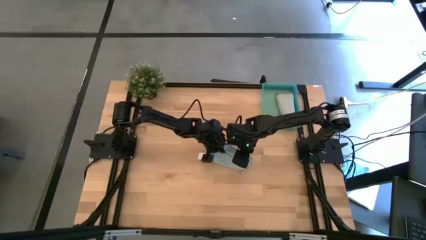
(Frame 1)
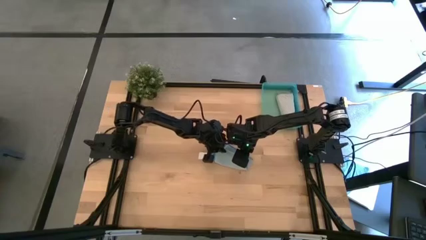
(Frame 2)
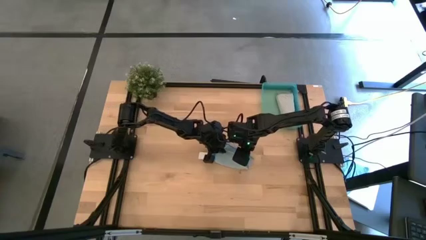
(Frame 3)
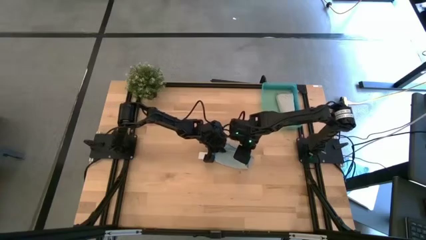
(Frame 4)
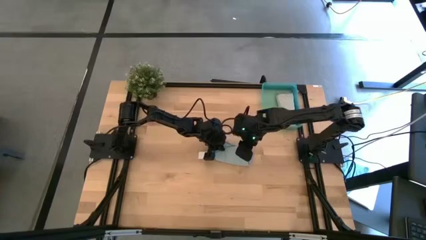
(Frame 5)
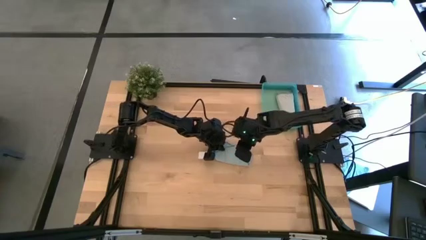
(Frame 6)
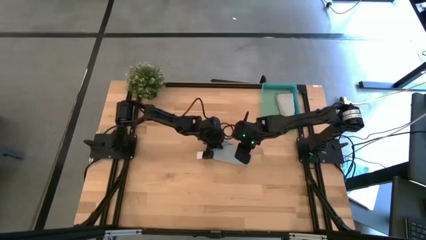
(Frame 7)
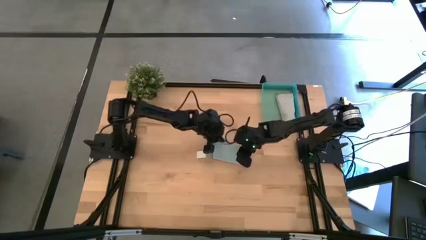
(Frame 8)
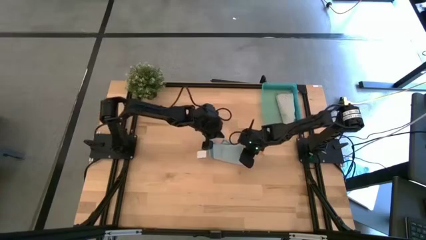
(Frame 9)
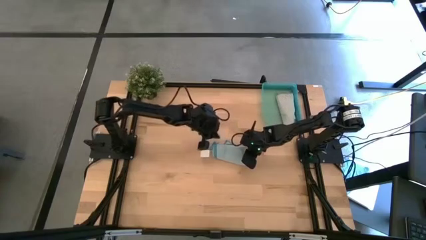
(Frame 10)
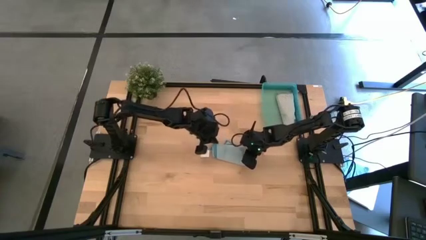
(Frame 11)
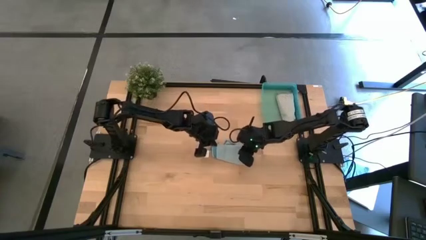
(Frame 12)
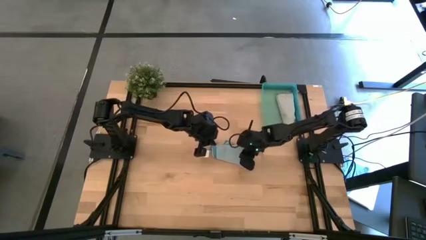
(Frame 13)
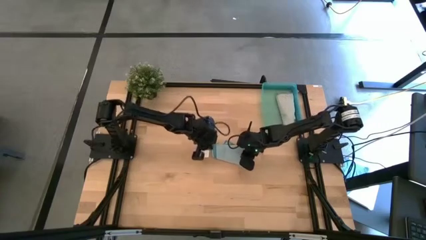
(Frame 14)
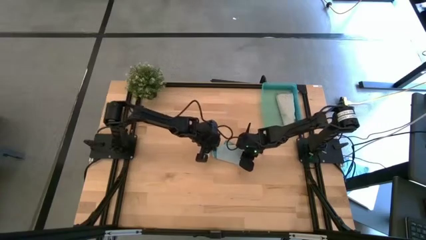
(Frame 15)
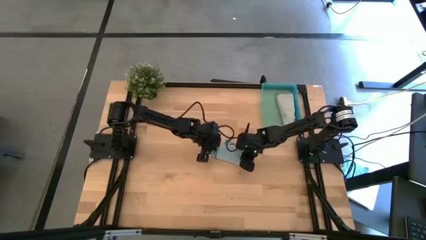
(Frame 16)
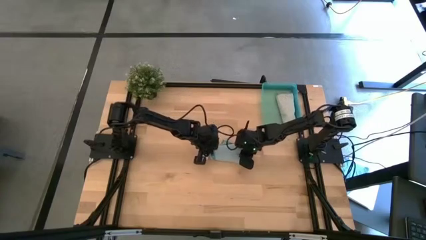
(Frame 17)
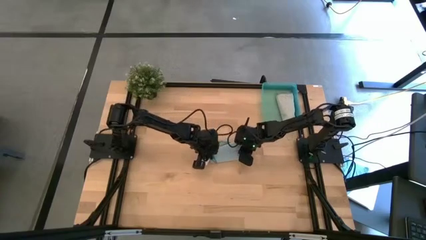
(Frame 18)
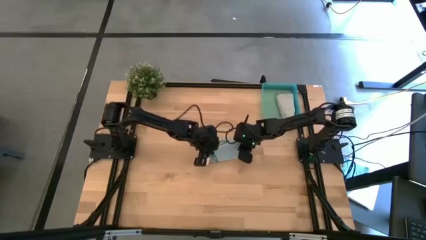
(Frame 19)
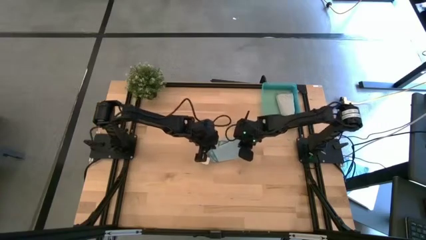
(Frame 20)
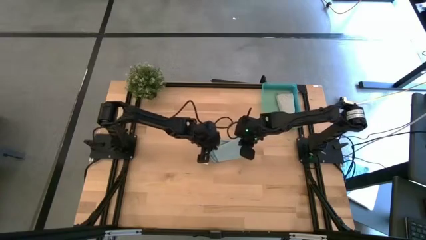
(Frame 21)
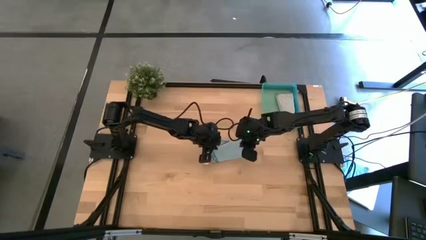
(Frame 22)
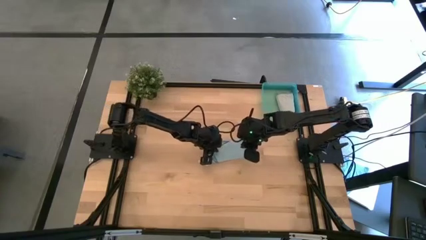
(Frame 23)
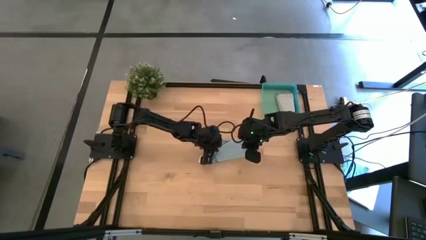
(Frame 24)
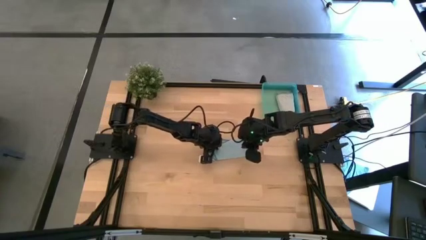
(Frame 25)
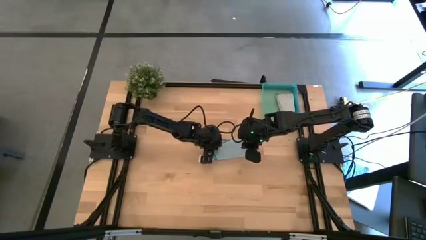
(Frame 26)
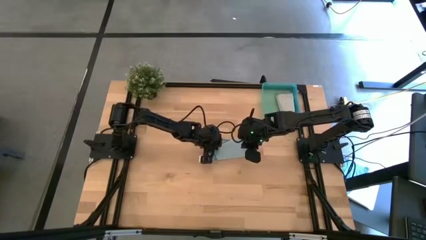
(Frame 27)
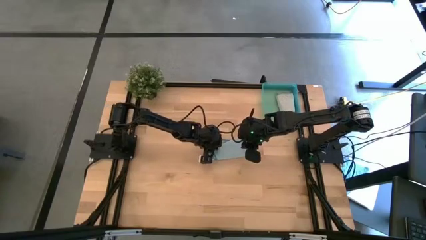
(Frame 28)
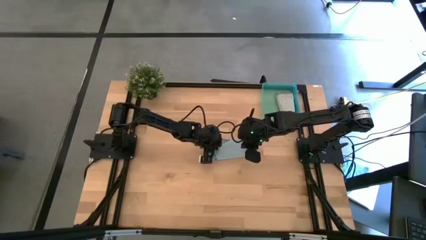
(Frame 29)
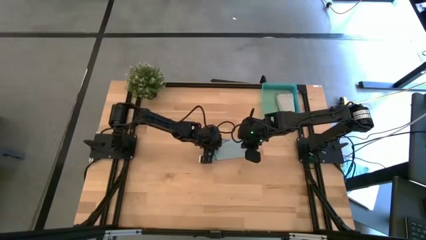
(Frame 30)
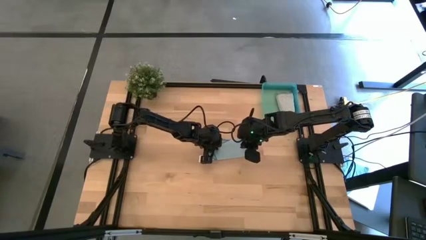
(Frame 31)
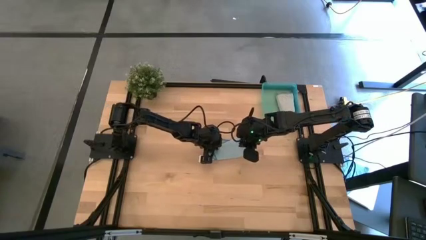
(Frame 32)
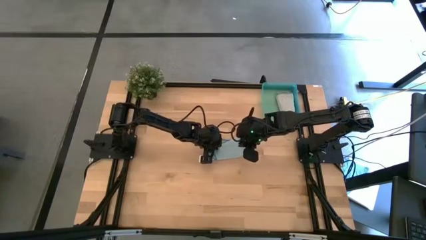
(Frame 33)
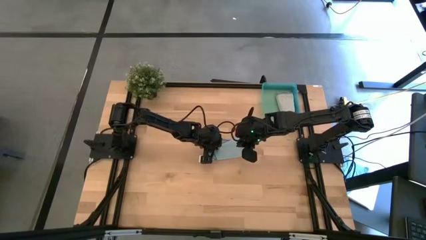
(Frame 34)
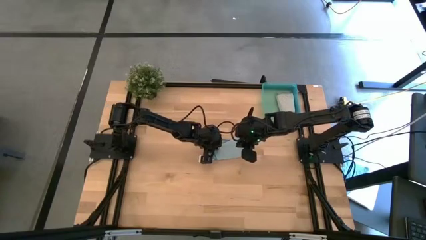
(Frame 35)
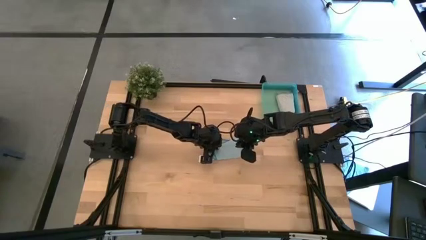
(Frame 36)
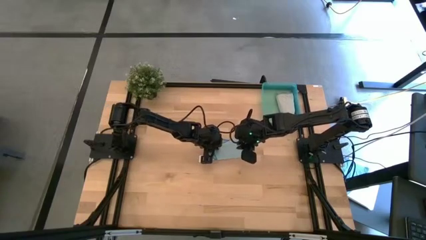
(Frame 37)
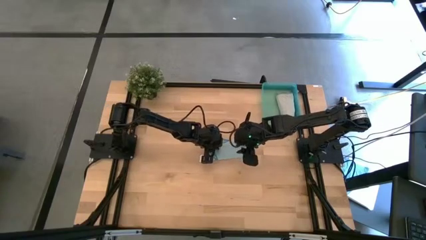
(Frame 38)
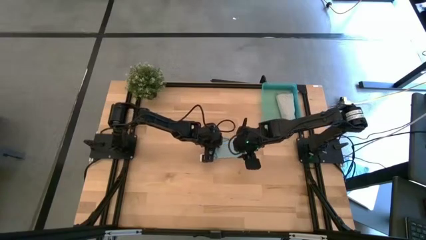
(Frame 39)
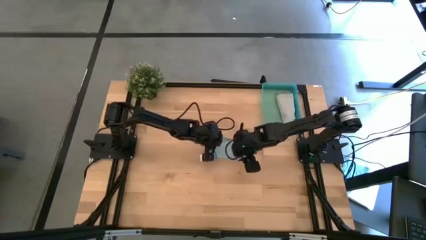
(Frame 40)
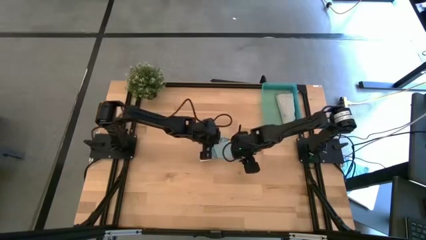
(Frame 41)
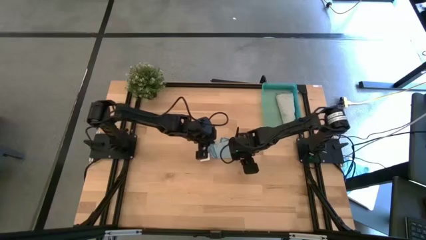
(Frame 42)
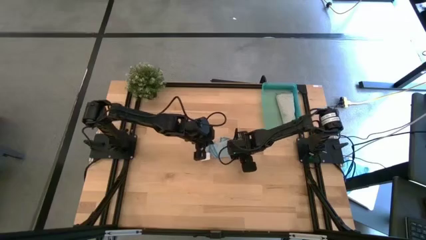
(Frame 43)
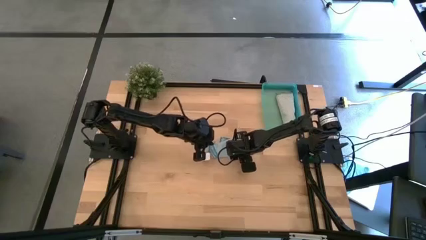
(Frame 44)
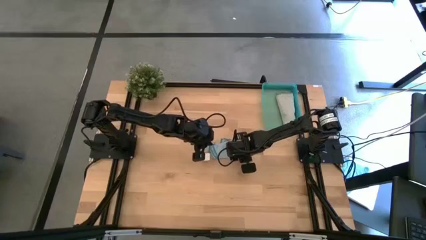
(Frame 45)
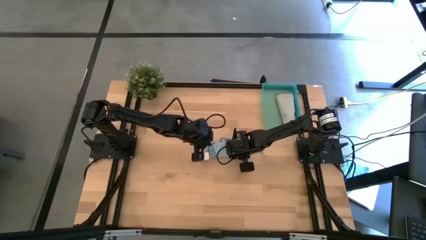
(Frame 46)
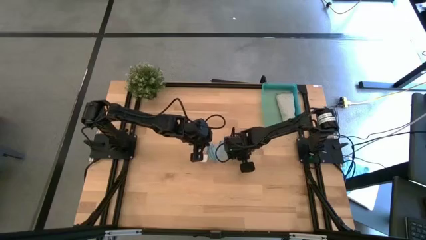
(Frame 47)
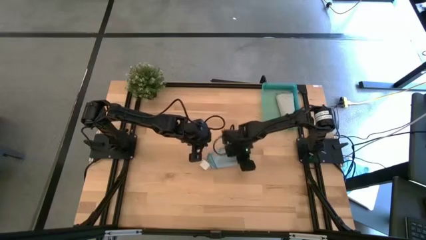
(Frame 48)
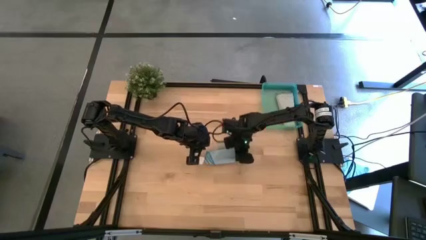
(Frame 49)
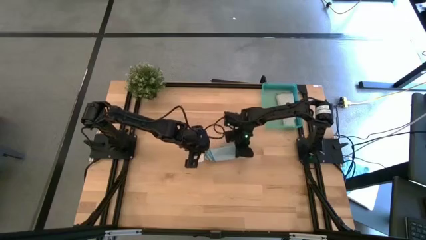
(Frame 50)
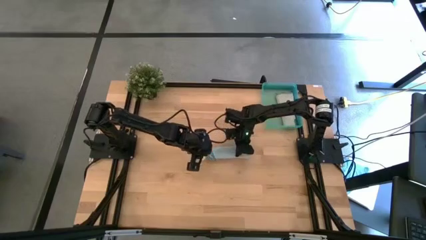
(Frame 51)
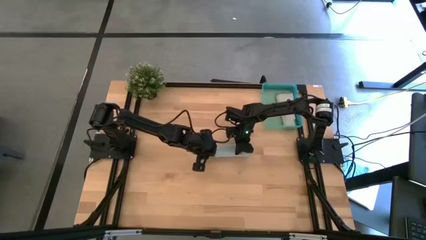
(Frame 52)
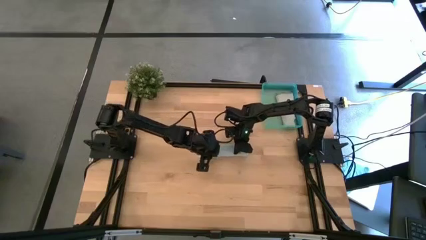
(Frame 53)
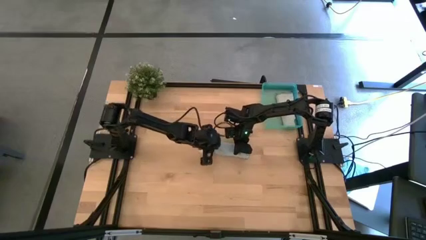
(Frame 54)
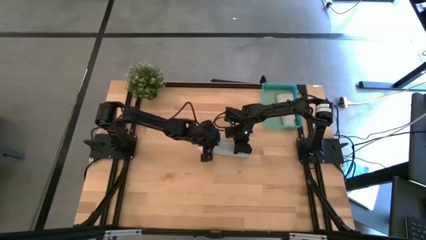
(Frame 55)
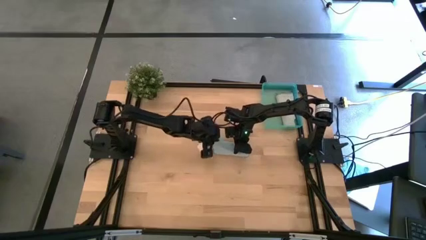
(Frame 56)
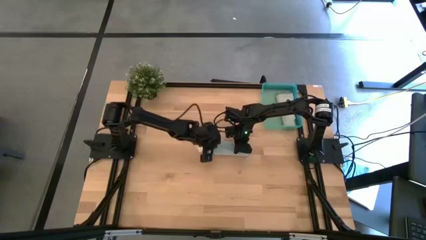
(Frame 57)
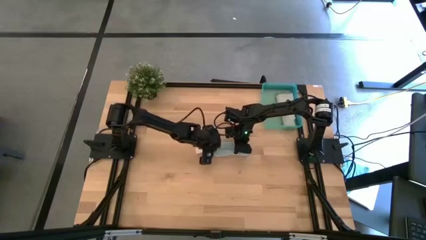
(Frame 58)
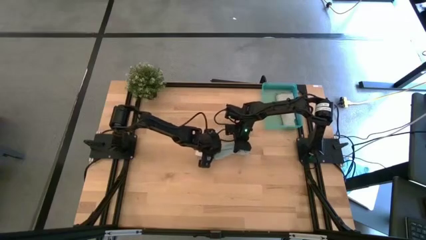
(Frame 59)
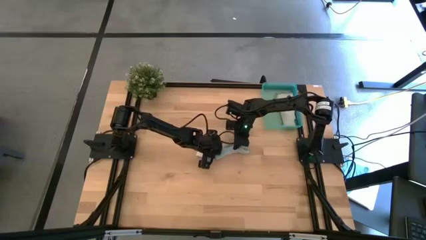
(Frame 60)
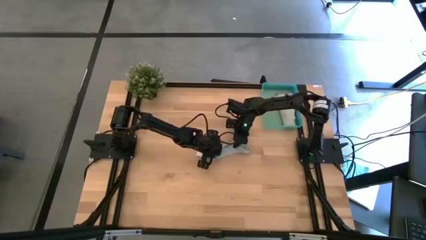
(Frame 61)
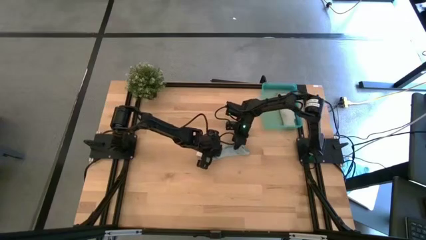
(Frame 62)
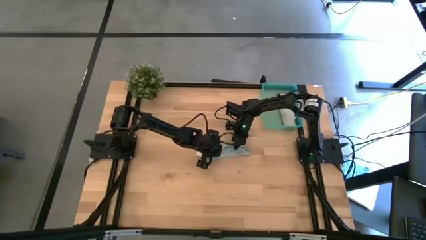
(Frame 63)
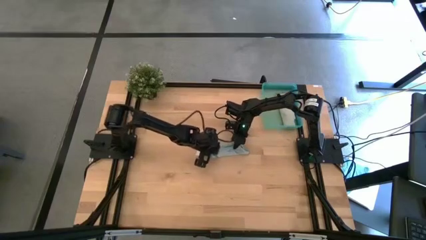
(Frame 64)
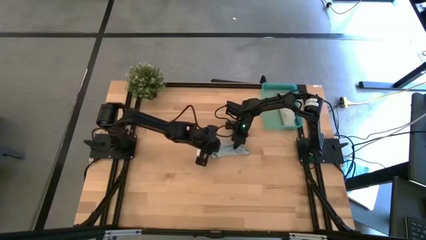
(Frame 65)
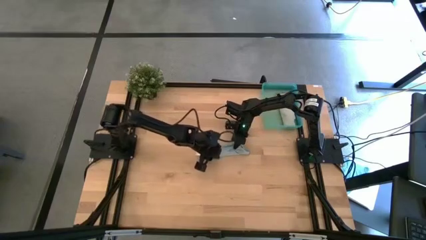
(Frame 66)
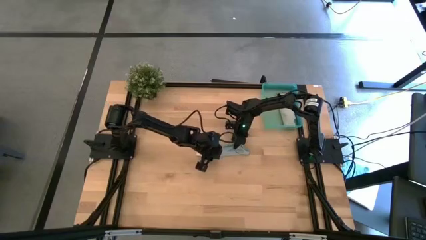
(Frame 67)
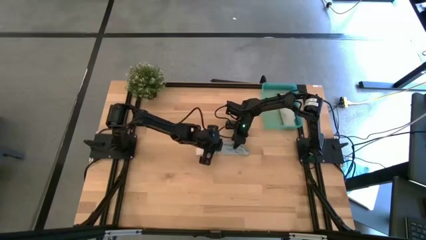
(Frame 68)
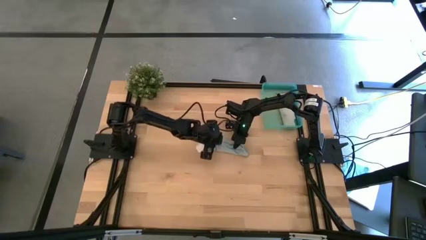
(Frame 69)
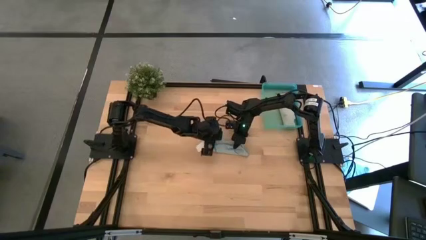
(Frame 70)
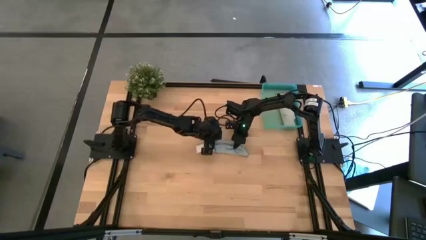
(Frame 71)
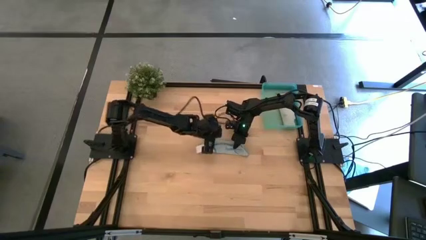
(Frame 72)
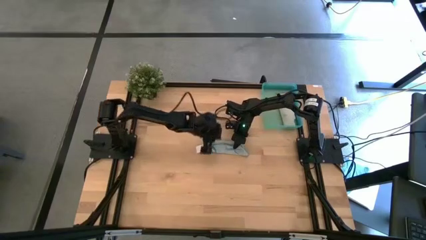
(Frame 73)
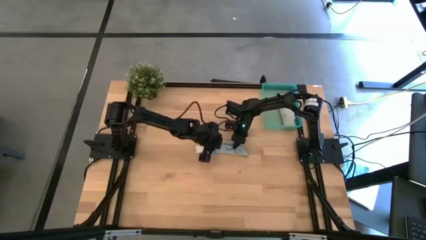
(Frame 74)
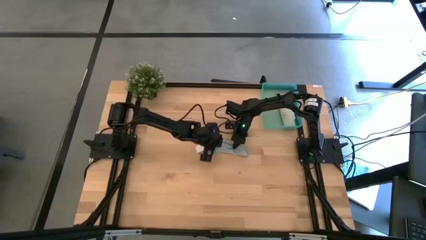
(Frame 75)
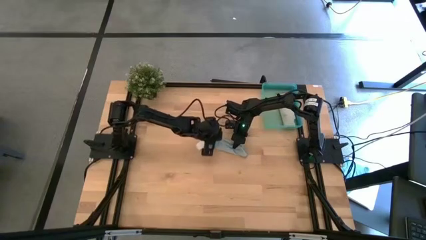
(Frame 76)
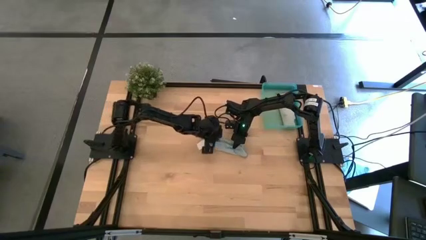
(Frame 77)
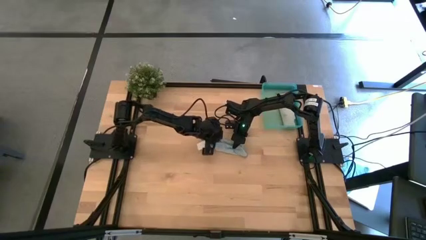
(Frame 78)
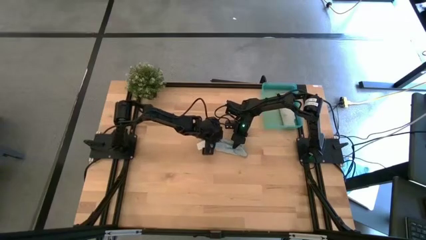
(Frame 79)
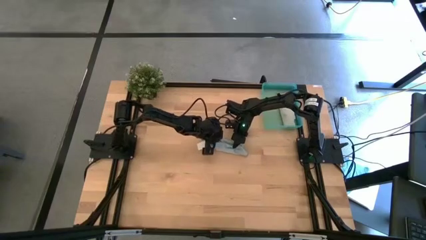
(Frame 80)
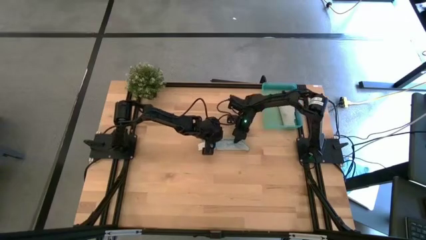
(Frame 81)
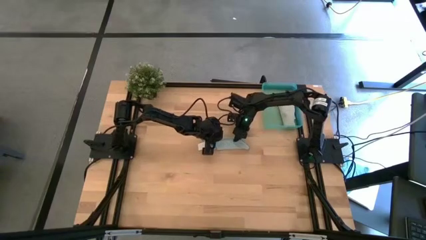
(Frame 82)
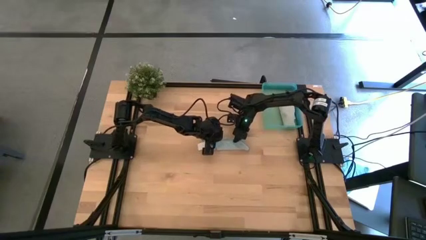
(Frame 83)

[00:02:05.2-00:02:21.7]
Task: Roll microfiber towels into tight, uniform cylinder then place into a basket
Roll the blue towel
